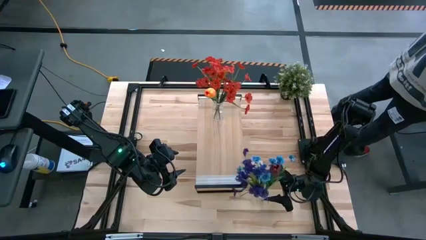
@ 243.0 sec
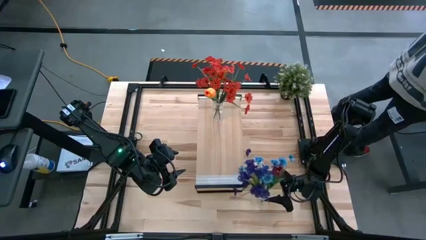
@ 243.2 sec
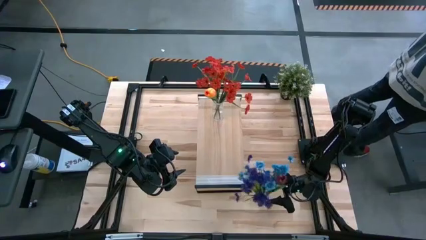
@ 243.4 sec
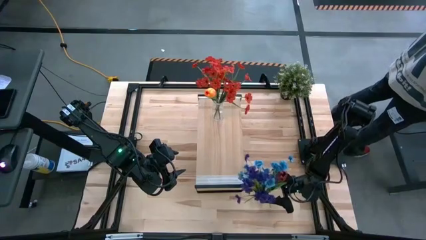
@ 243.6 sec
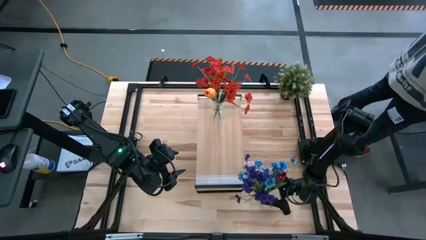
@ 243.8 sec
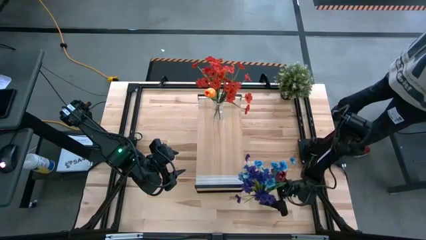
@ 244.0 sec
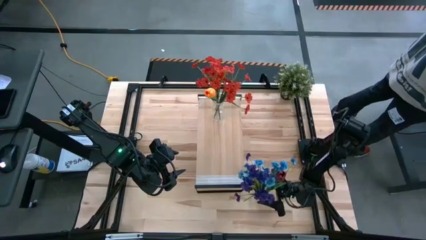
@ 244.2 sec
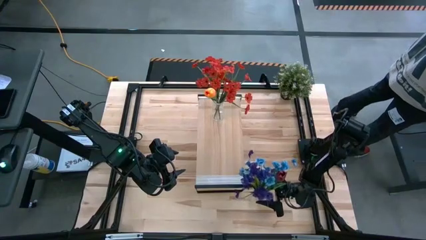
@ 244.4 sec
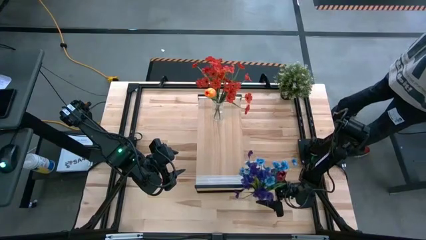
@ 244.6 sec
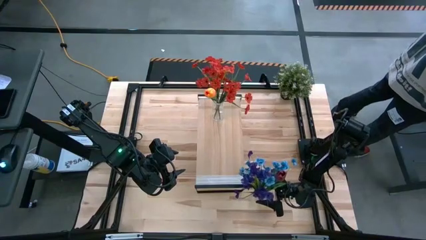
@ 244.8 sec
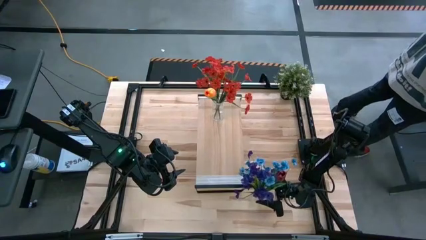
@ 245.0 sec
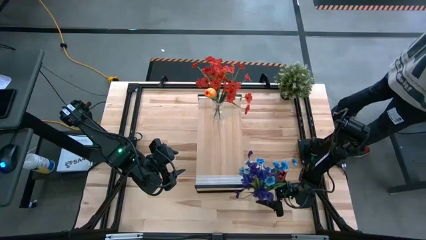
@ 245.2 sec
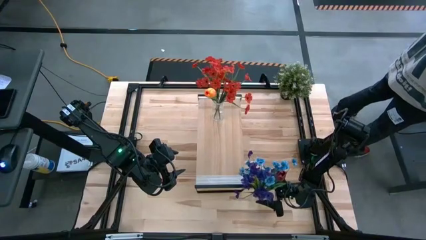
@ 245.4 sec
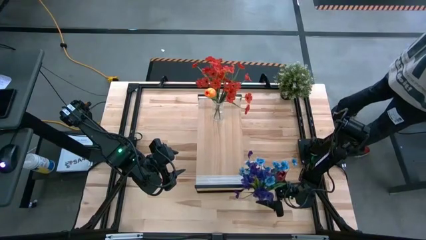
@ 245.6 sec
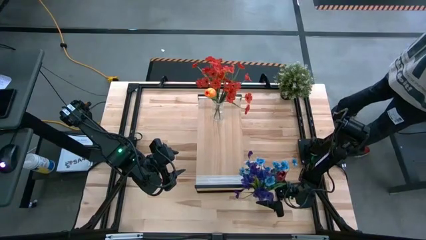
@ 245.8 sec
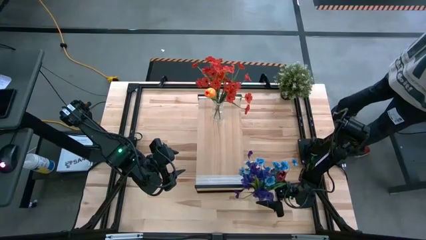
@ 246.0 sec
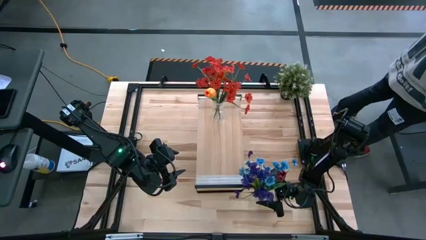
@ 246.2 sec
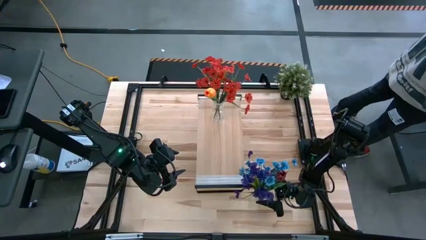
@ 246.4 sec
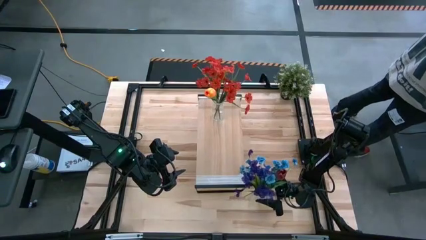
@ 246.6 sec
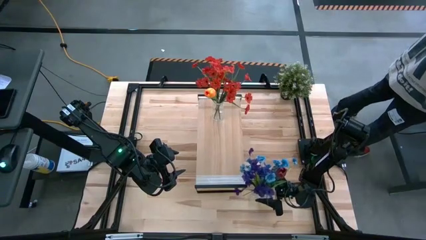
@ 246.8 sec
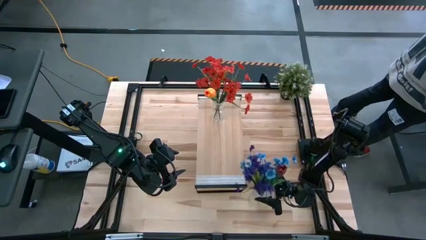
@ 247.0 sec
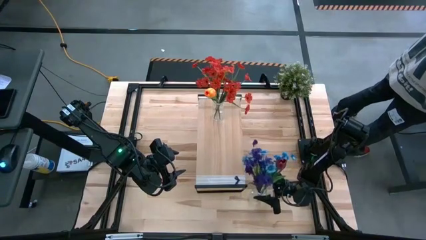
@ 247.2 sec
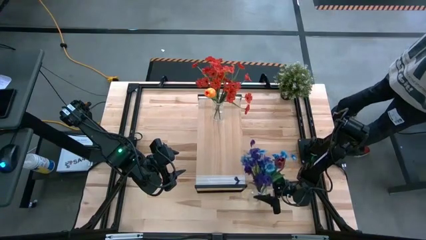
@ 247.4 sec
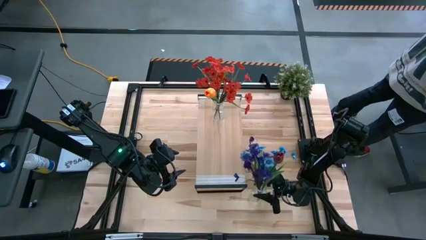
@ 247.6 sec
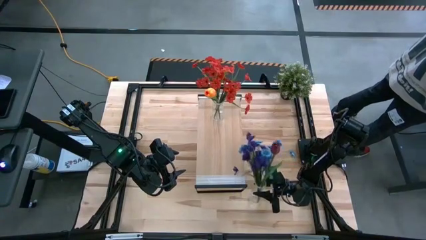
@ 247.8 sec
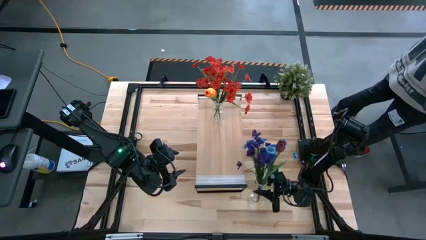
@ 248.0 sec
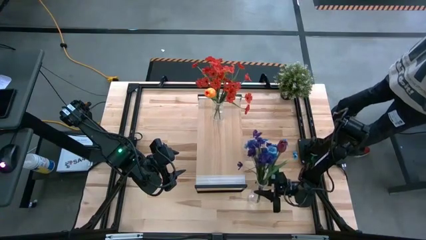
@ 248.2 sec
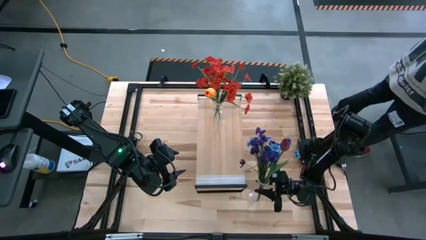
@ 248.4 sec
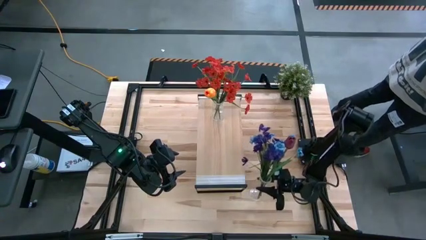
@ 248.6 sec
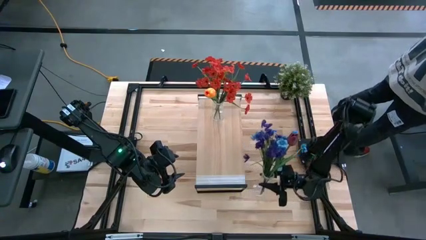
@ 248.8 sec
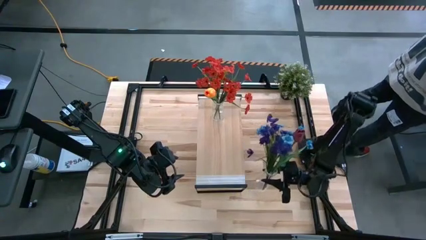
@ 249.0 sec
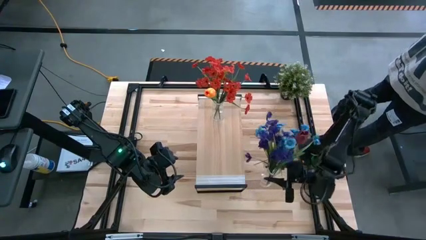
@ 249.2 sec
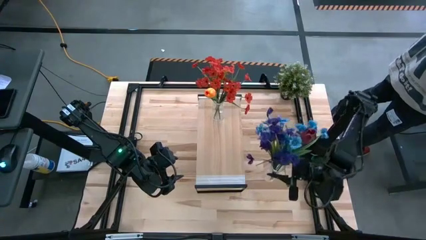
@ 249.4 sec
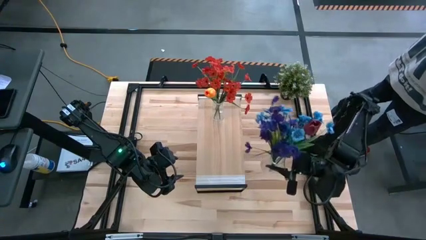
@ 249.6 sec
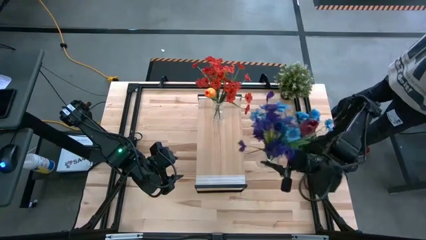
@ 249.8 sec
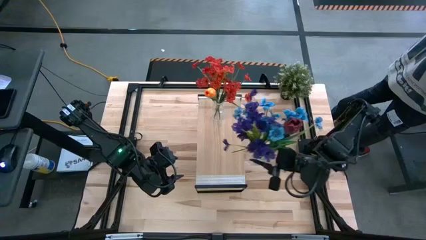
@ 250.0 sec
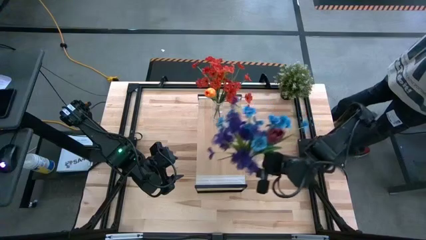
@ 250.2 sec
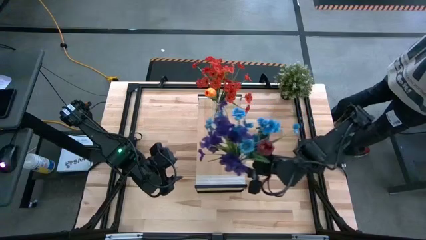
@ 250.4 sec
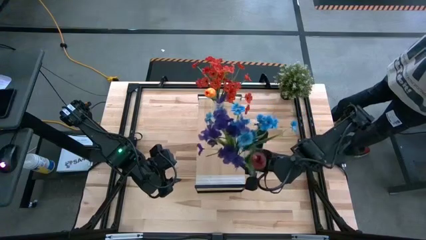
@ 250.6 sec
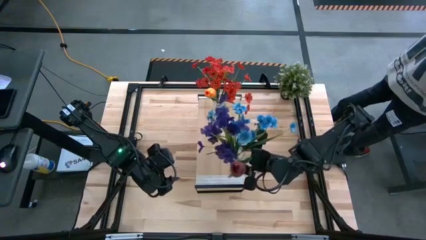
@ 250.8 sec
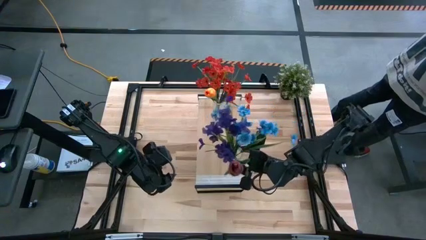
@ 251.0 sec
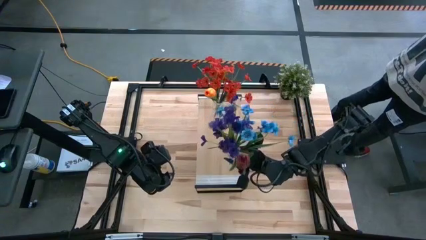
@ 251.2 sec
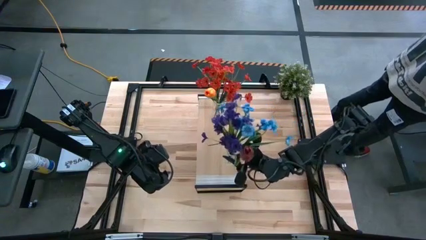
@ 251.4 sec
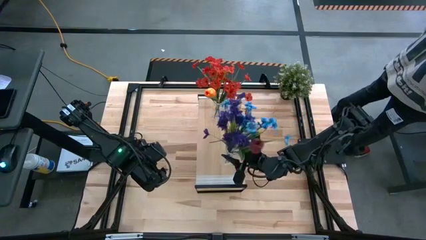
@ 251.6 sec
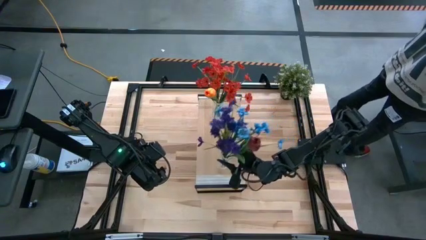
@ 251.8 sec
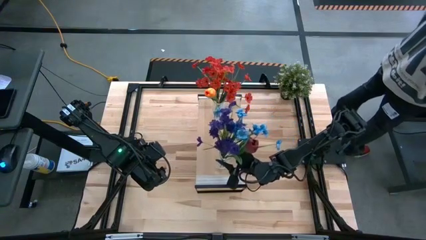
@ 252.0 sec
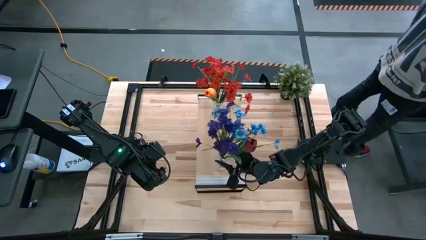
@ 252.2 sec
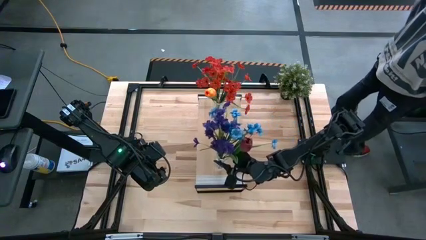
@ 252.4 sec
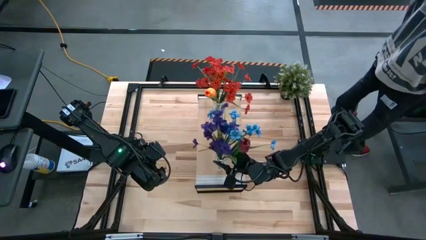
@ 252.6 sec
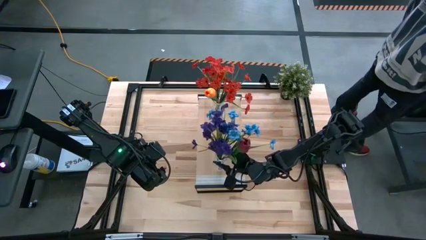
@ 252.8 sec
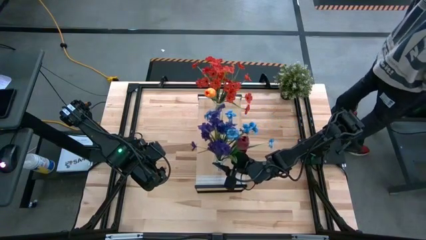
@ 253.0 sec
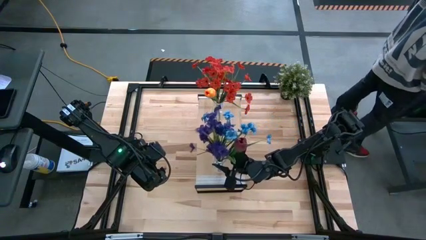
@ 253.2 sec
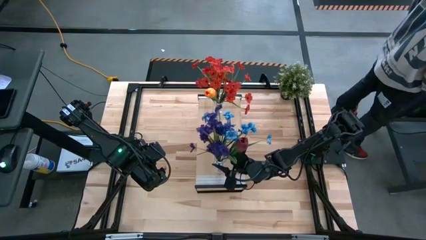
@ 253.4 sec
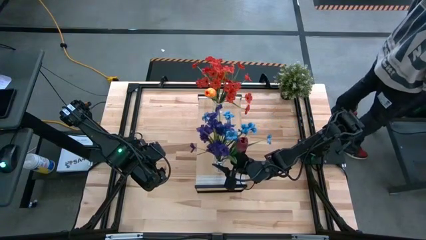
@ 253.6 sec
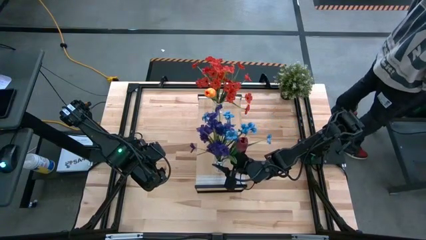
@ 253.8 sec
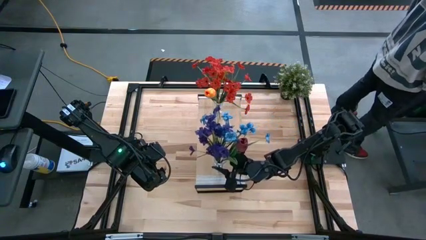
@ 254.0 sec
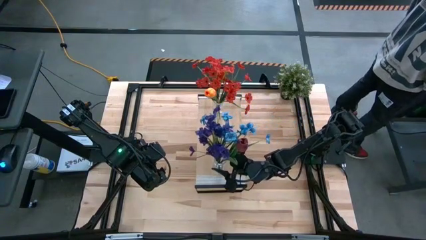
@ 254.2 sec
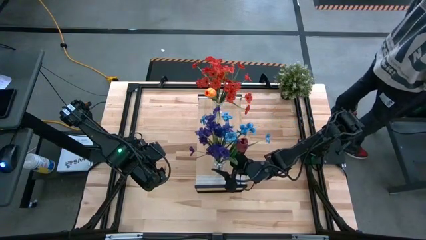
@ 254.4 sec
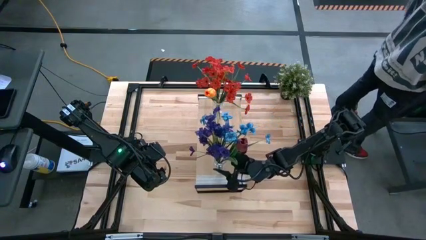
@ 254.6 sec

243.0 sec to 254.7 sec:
Task: Pick and place flowers into a vace then onto a shelf
Put the transparent vase with flowers on the shelf

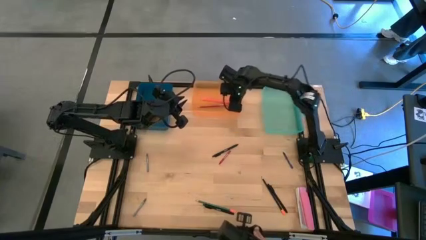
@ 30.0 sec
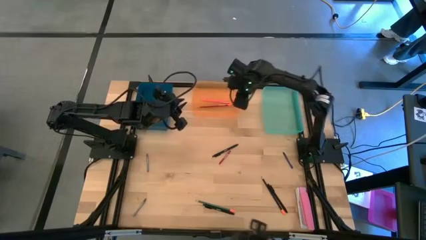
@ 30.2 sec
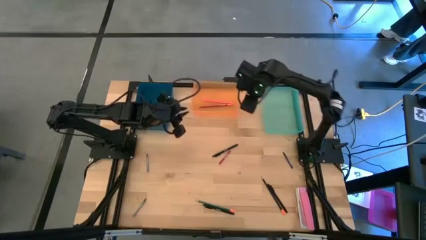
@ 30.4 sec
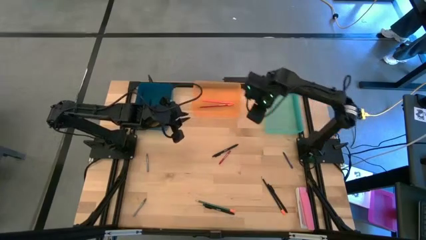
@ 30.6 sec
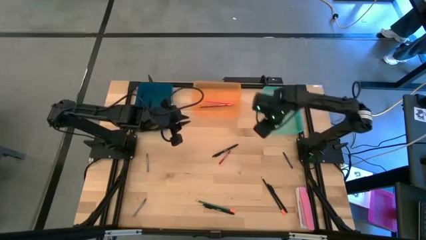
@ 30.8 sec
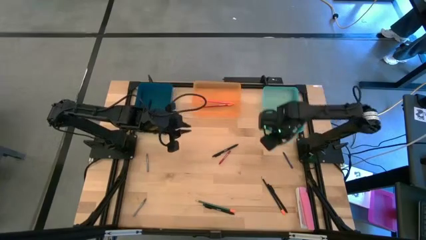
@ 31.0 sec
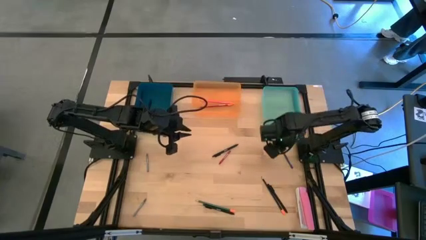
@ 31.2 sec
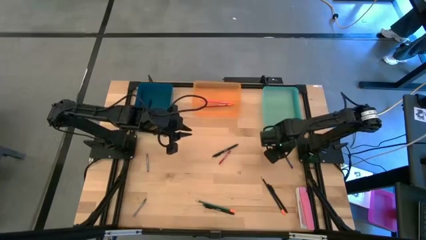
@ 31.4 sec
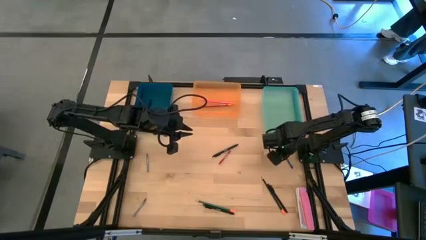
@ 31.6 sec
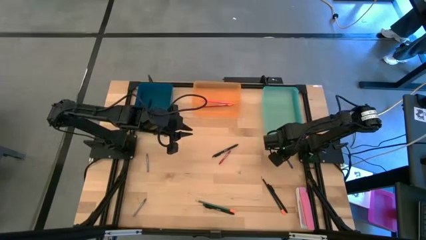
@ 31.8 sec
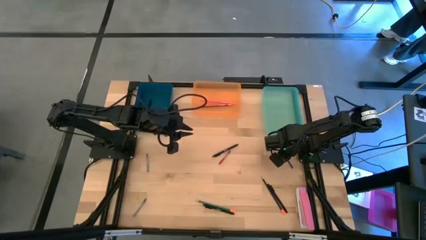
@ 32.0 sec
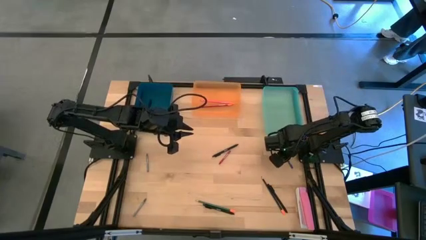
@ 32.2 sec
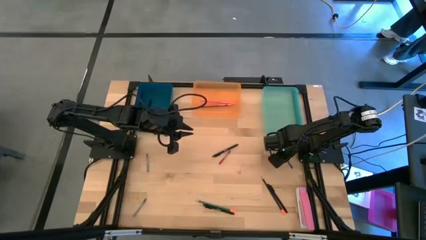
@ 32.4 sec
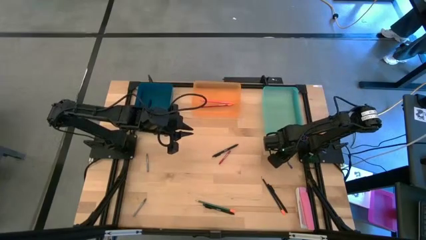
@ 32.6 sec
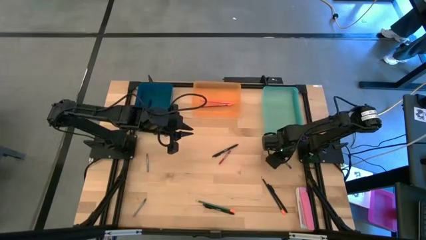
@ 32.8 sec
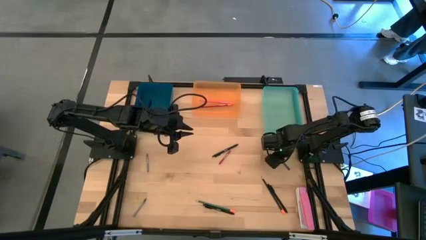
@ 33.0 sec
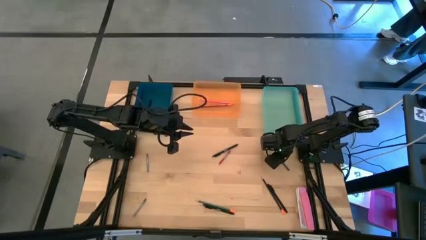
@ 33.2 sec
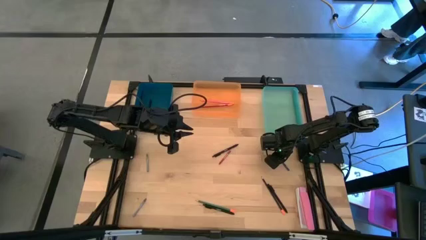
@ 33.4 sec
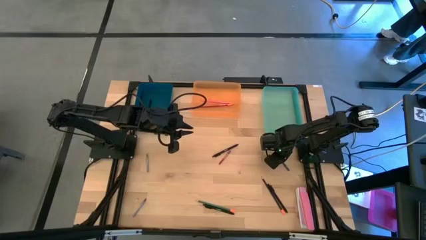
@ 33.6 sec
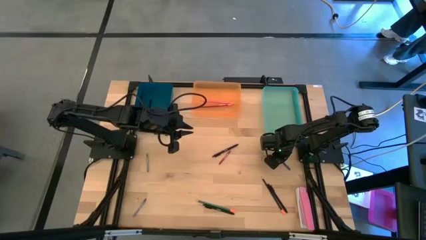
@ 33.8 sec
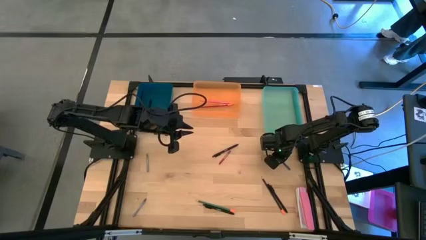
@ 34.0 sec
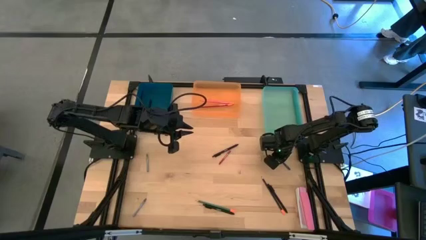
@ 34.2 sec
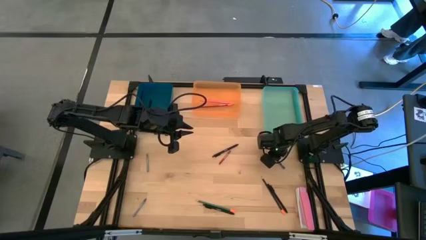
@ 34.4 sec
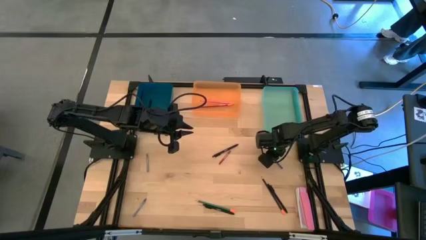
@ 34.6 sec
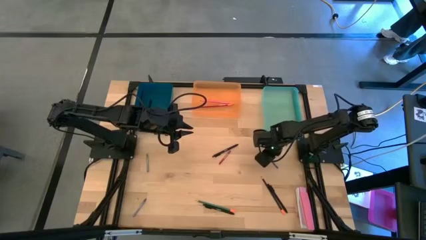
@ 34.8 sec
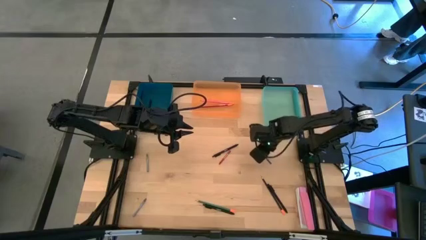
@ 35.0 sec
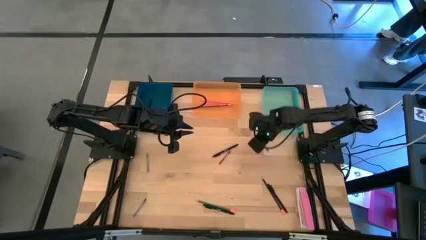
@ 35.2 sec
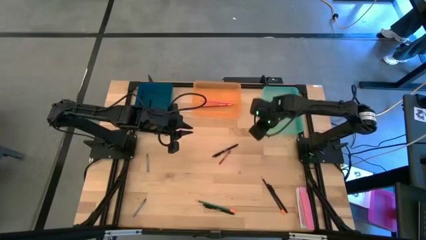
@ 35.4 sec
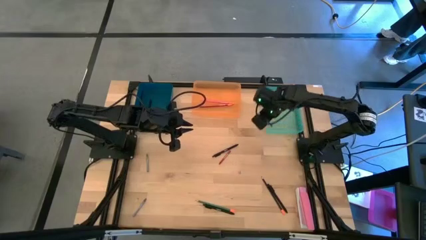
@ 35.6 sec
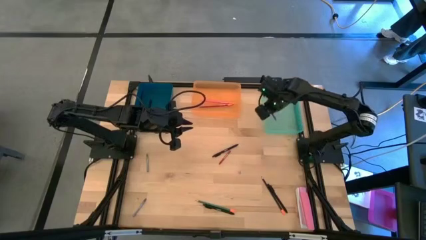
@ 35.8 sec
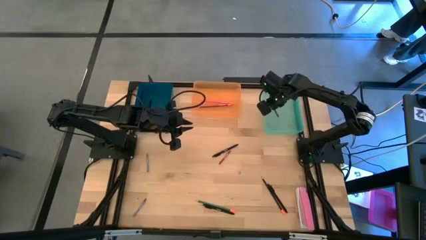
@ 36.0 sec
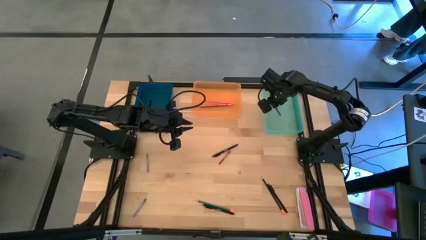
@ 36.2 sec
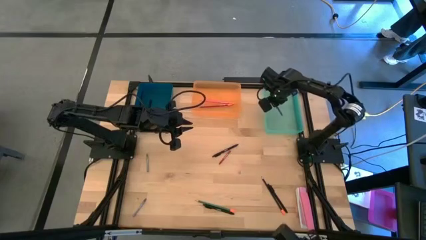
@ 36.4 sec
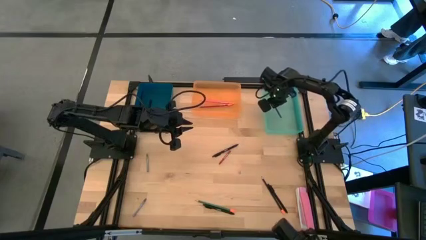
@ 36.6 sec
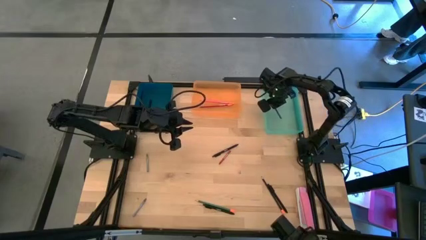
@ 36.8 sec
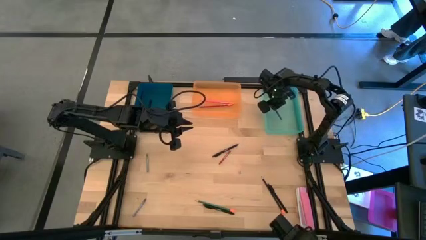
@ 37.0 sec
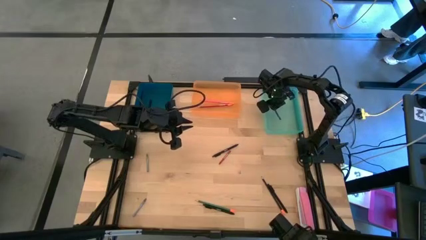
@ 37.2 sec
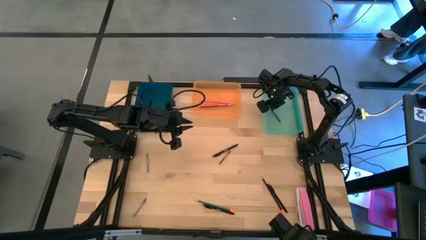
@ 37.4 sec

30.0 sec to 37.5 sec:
Task: Sort crayons/erasers/pens/pencils in bins
Put the blue crayon into the blue bin
